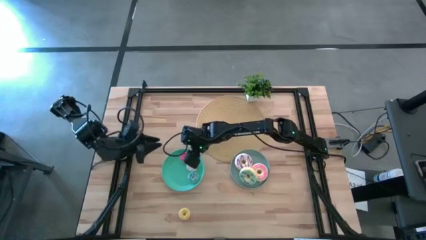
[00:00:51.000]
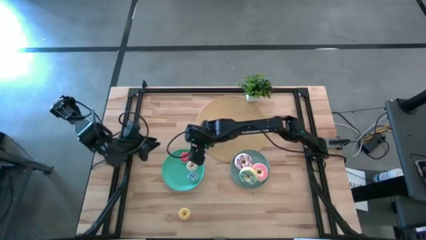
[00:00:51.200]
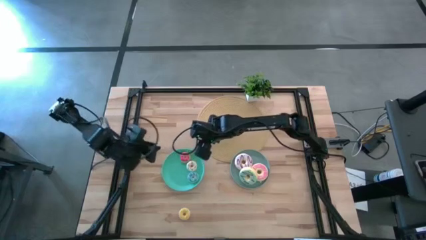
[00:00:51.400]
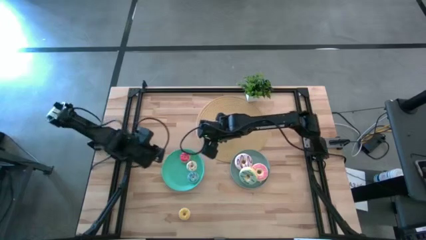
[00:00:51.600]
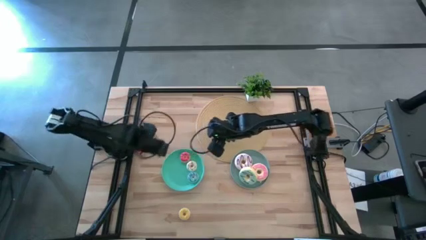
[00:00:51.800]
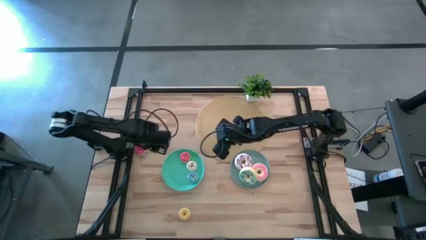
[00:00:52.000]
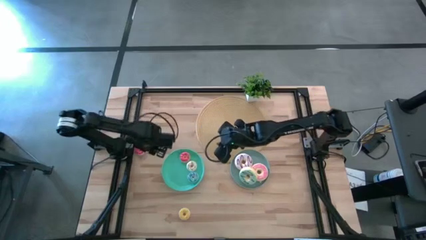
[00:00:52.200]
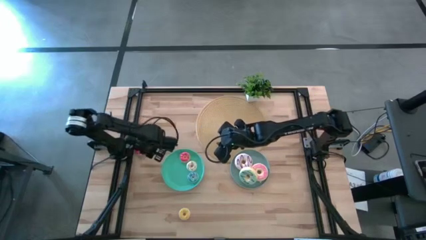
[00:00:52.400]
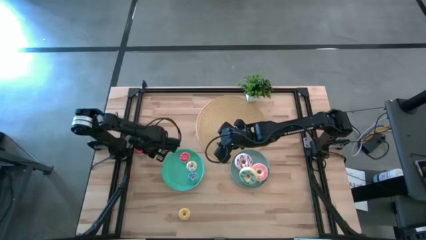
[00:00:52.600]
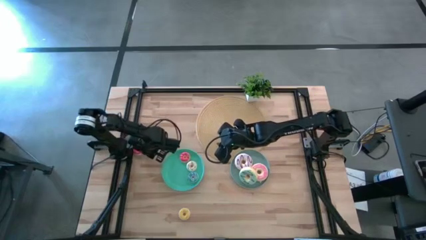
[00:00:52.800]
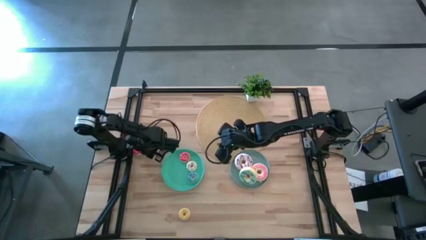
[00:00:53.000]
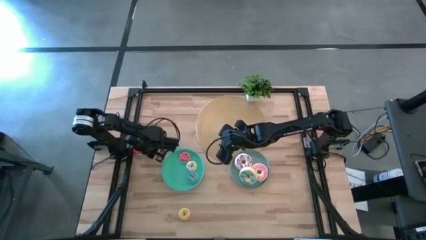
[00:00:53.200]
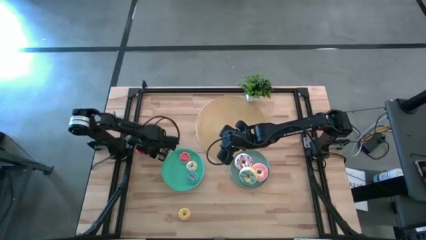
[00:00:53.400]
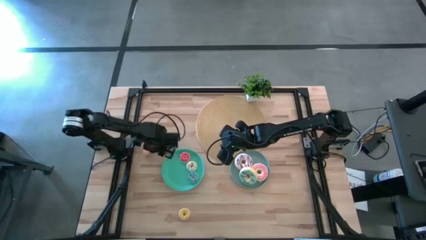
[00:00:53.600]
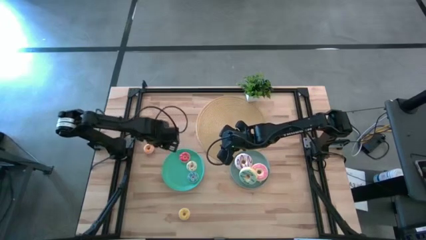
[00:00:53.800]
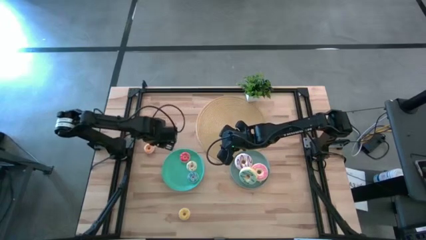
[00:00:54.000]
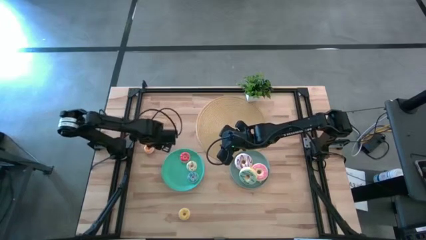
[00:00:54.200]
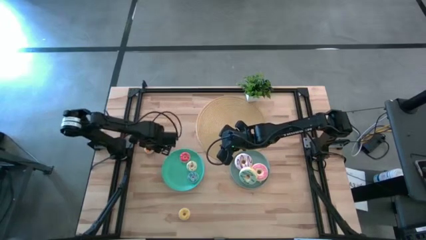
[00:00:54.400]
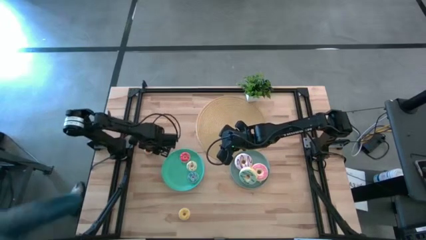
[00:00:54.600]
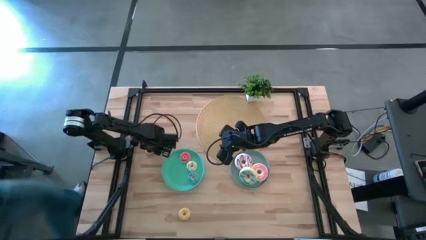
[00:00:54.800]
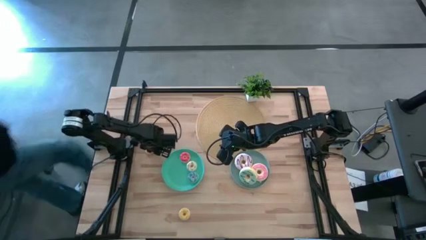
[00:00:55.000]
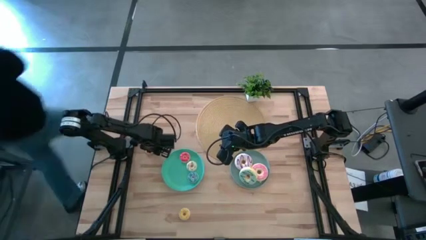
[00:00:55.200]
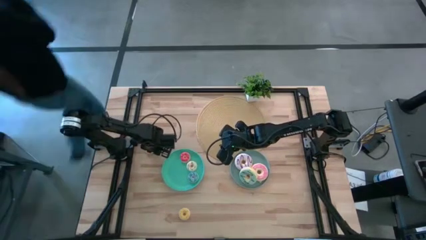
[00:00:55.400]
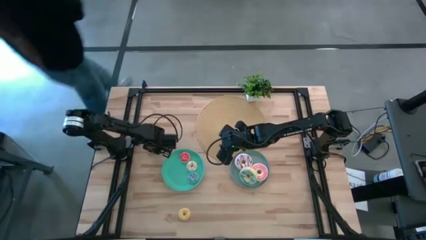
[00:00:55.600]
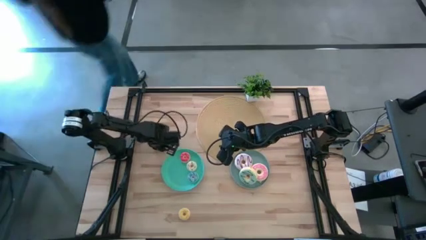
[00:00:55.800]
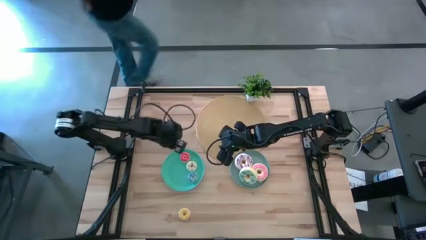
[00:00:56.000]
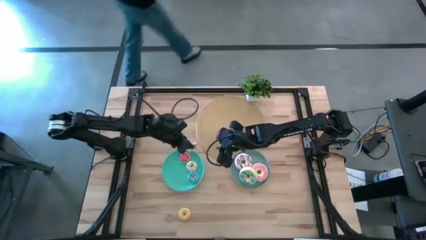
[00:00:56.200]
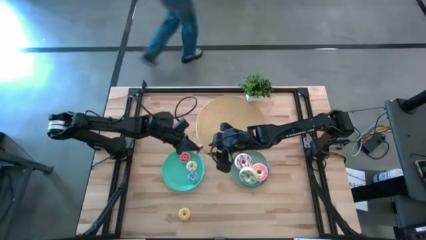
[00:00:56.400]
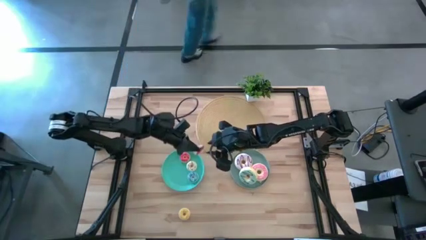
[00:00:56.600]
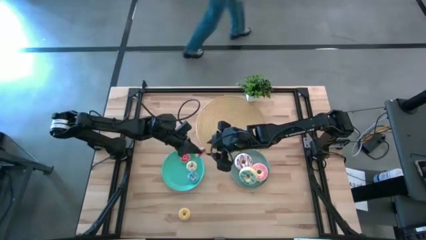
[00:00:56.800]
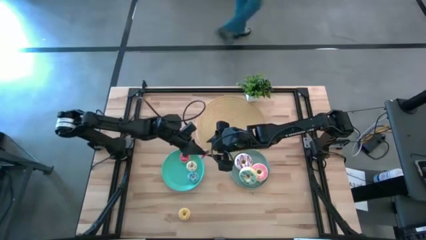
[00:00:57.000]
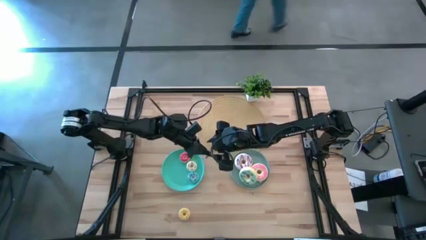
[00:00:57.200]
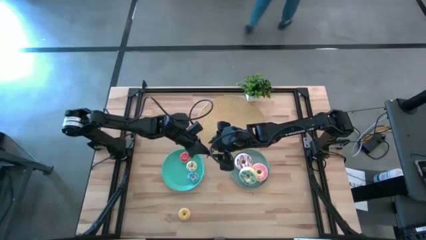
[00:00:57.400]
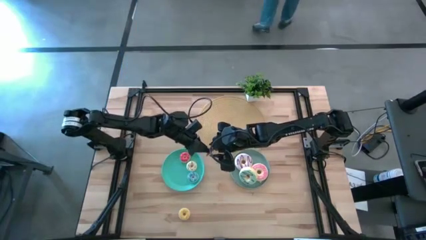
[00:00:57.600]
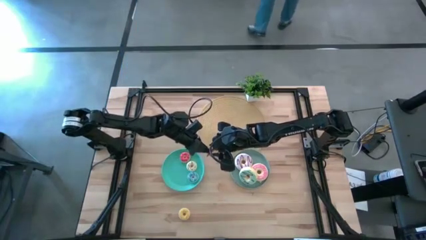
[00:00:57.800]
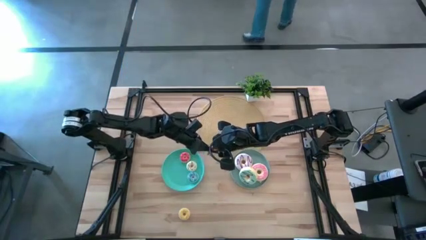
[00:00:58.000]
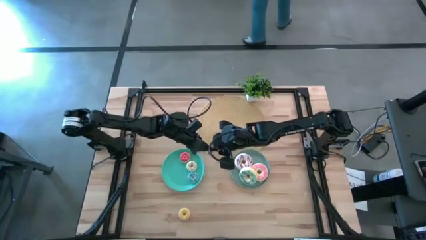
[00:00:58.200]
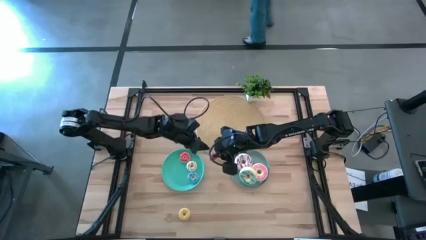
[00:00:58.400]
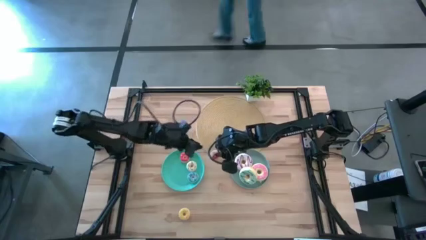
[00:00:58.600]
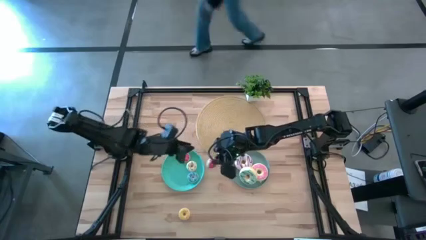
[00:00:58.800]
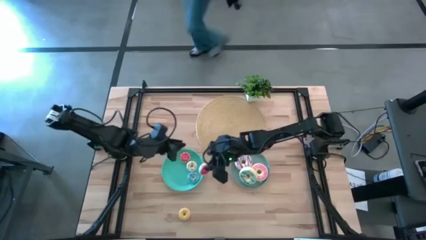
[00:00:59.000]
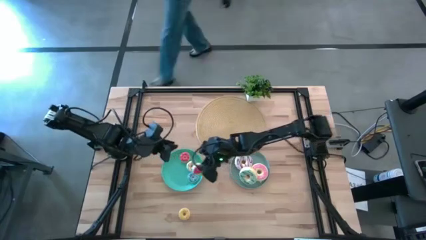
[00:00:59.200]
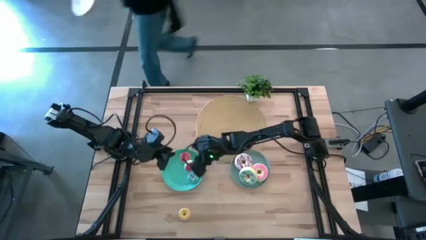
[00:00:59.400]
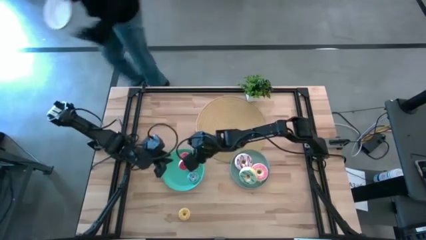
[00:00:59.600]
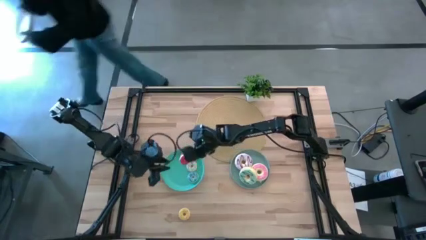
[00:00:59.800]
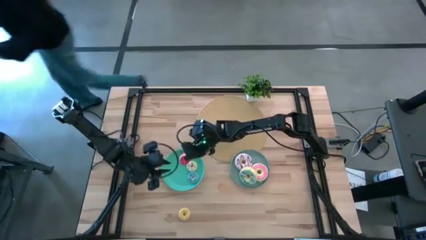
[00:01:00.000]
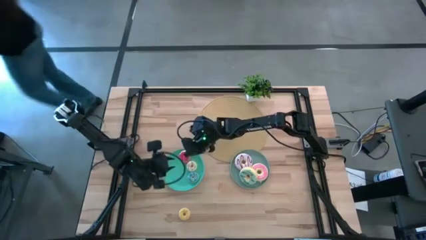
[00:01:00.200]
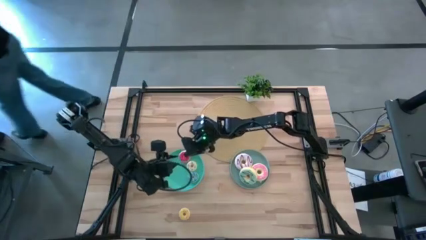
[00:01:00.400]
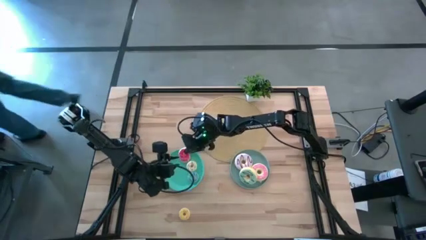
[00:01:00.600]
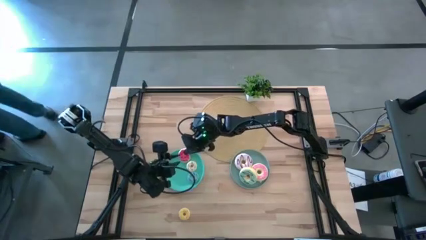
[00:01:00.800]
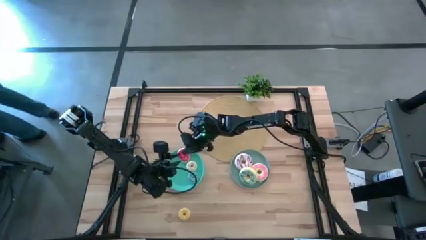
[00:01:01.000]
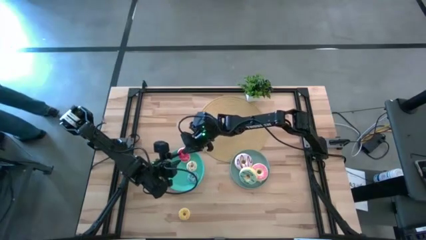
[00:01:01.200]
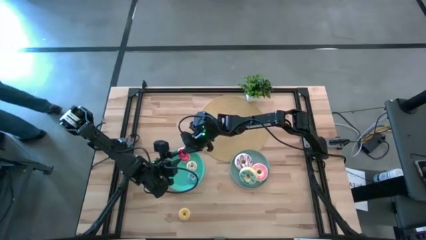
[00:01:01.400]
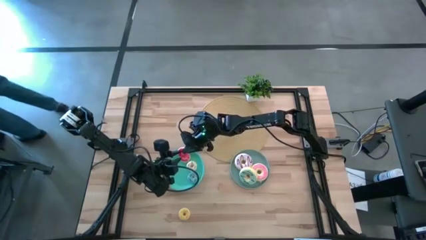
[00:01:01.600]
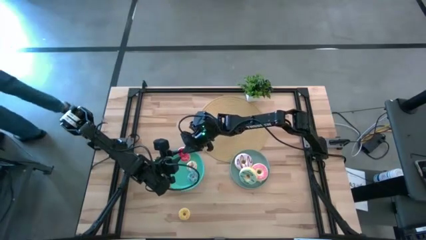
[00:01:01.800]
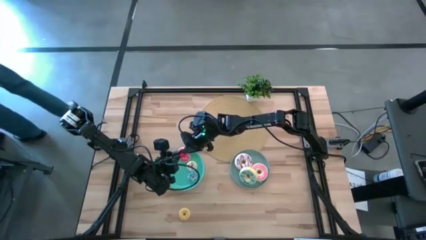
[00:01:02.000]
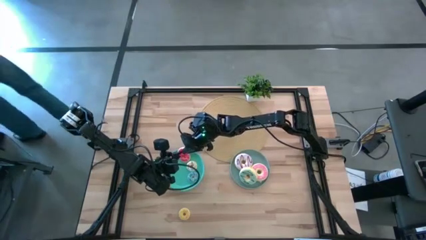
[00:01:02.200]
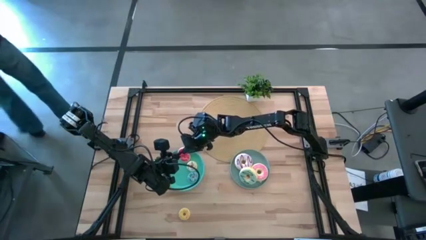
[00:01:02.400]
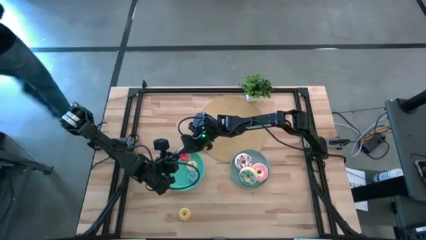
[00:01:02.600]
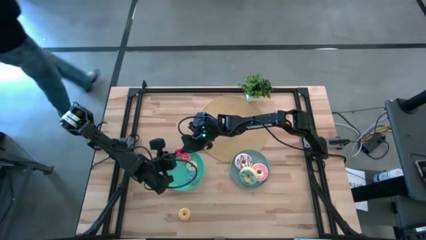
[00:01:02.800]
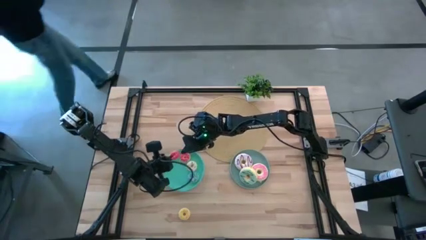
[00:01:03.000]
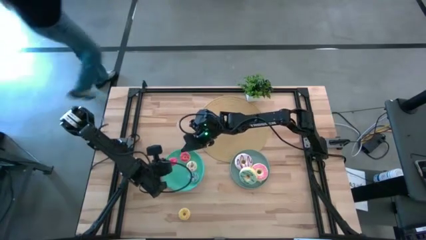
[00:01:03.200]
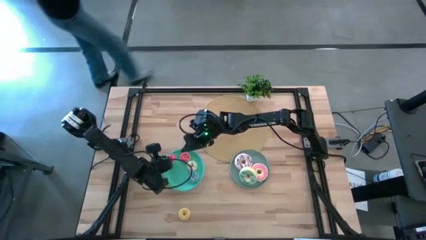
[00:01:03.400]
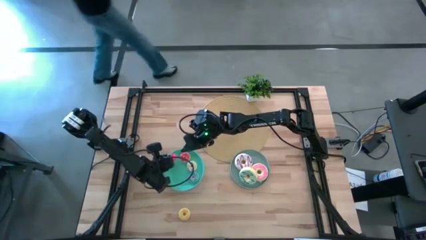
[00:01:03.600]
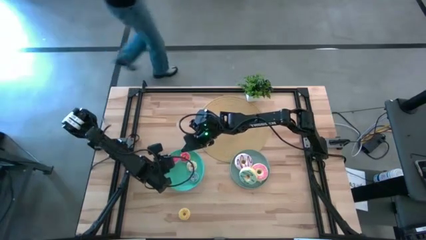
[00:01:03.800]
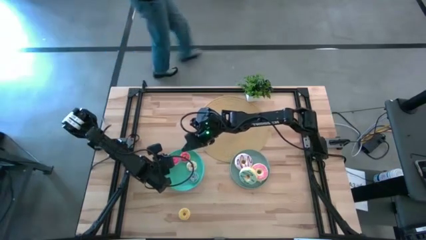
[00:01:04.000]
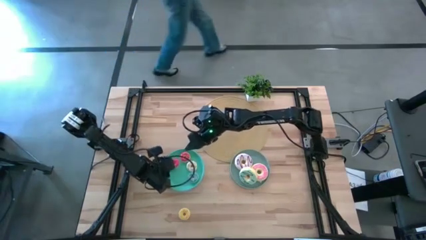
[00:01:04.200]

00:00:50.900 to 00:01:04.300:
Task: Pick & Place donuts
Put the small pink donut on the blue plate

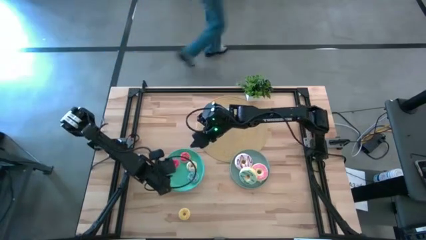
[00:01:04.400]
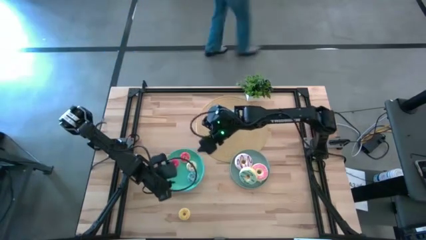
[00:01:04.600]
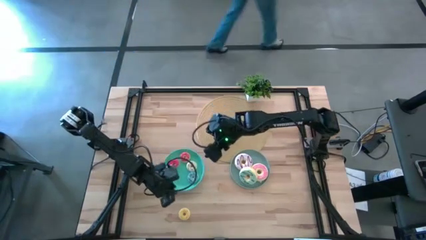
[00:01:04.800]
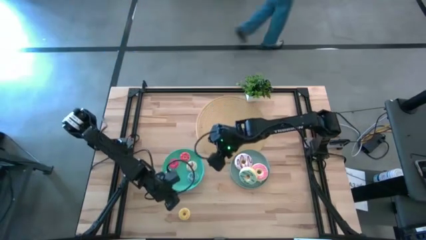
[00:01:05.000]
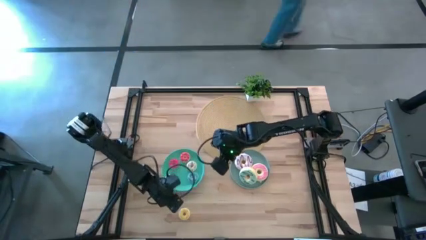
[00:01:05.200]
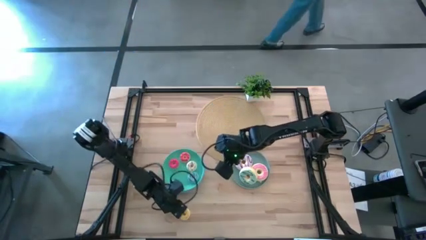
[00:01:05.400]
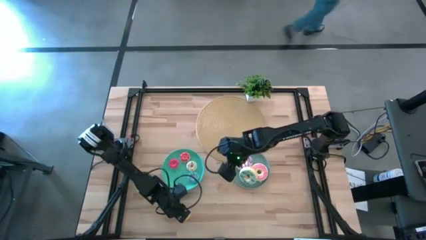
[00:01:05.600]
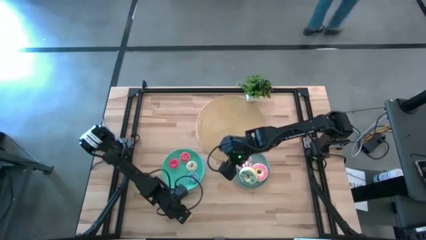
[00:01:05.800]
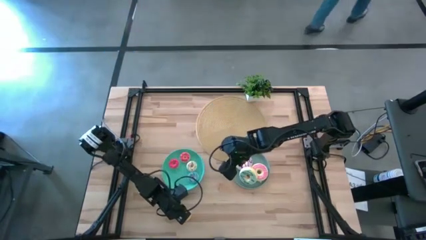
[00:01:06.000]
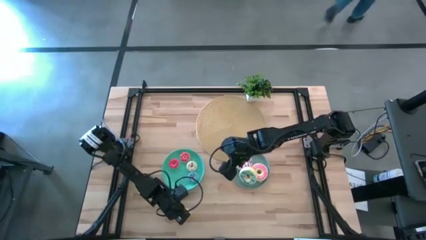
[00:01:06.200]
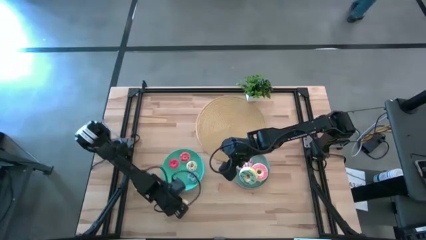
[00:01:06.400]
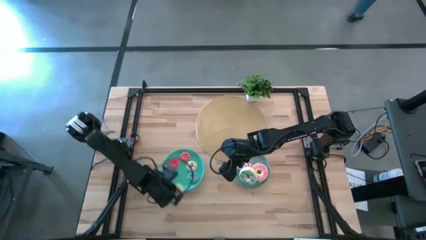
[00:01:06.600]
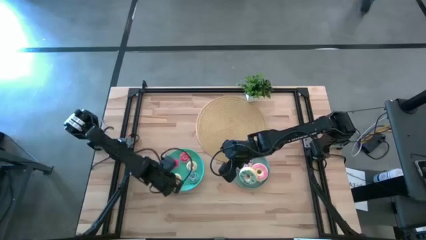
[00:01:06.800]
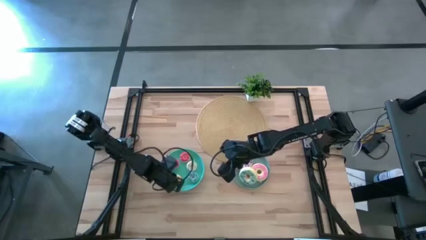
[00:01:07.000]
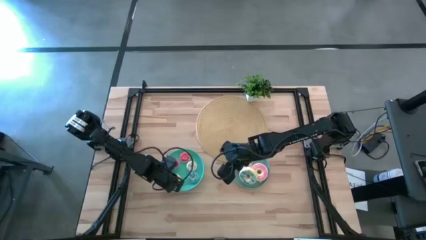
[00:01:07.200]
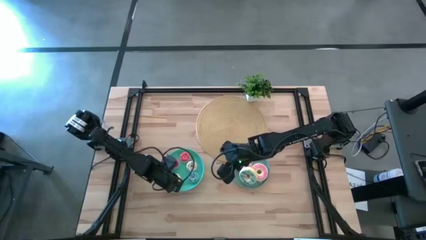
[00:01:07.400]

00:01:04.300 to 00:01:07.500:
Put the small yellow donut on the blue plate
